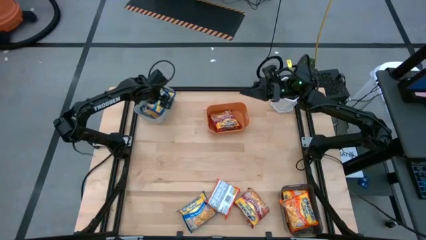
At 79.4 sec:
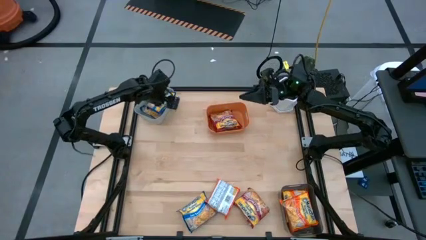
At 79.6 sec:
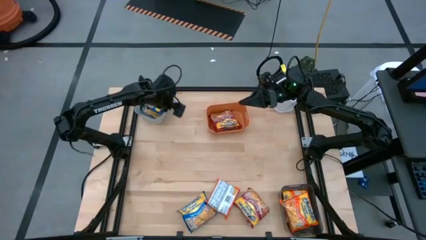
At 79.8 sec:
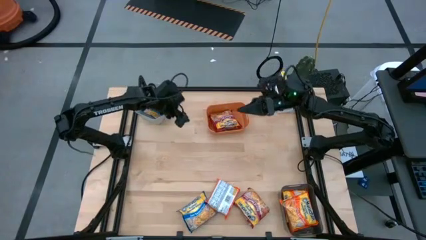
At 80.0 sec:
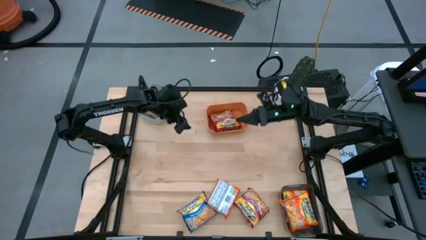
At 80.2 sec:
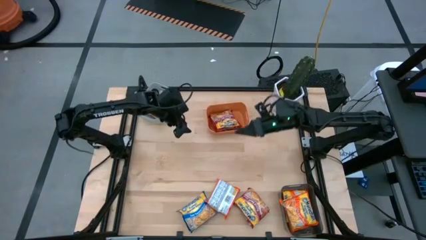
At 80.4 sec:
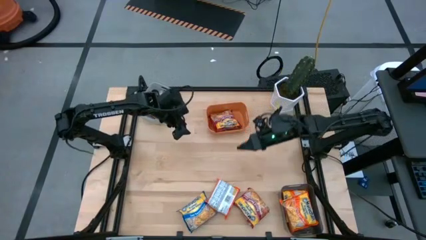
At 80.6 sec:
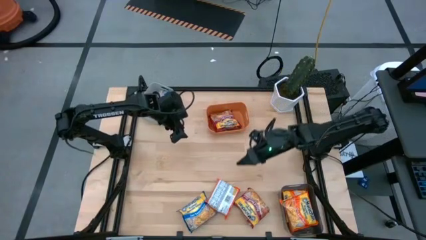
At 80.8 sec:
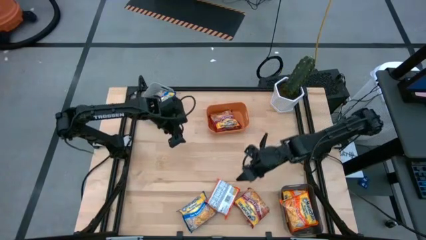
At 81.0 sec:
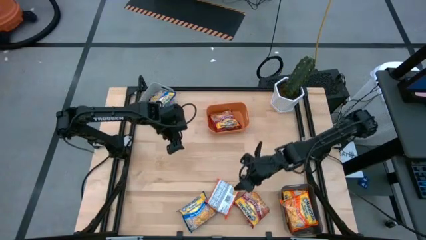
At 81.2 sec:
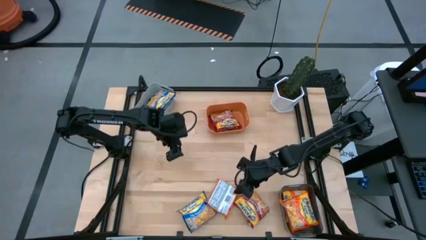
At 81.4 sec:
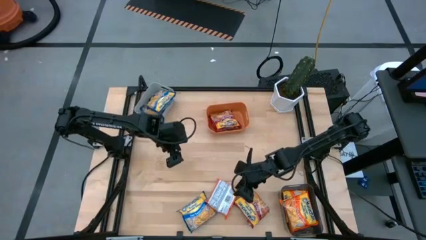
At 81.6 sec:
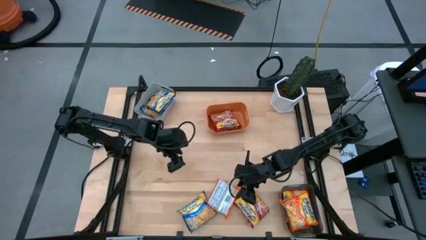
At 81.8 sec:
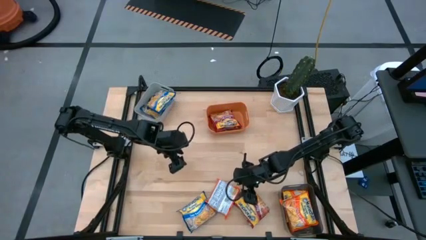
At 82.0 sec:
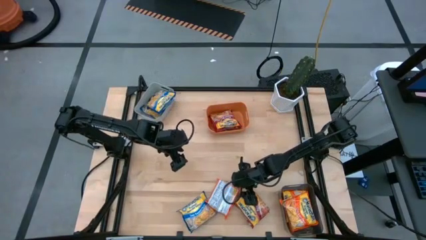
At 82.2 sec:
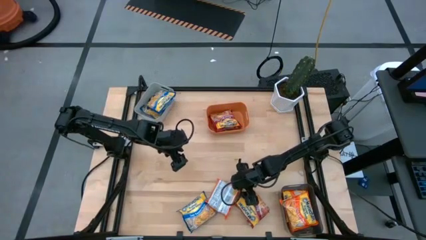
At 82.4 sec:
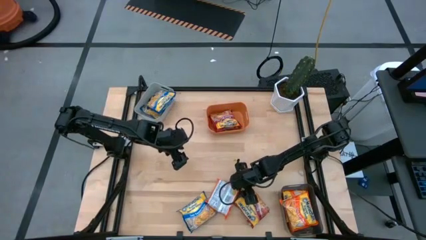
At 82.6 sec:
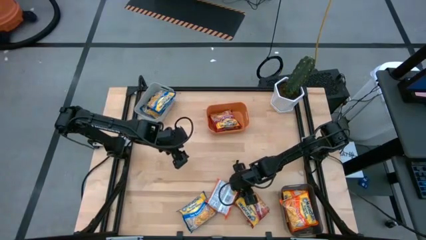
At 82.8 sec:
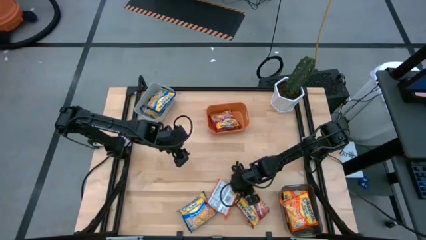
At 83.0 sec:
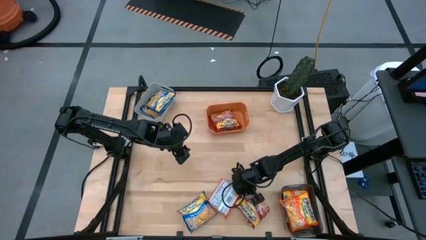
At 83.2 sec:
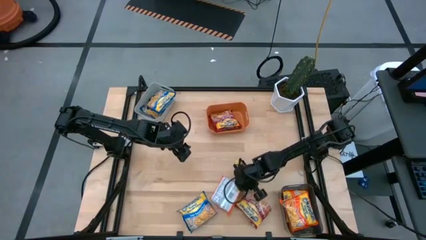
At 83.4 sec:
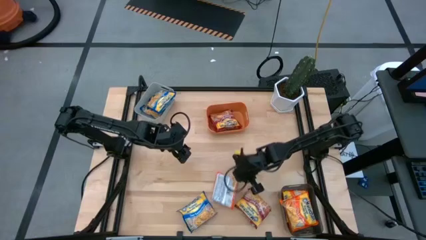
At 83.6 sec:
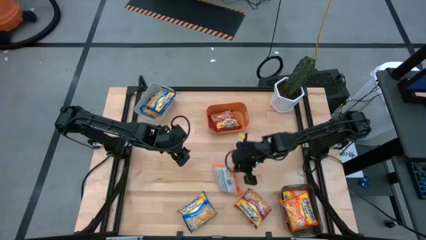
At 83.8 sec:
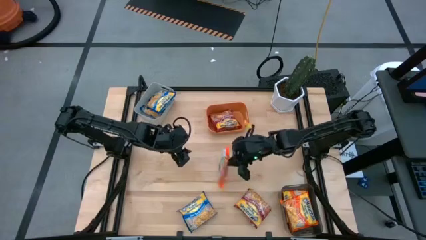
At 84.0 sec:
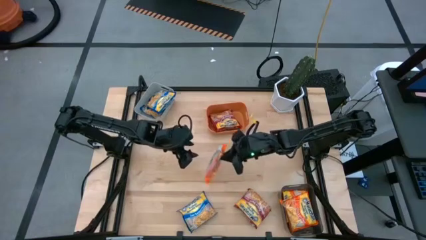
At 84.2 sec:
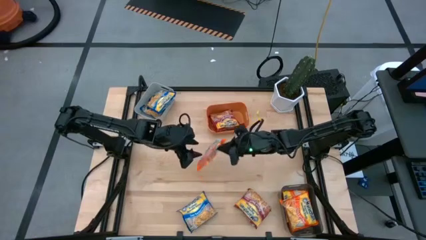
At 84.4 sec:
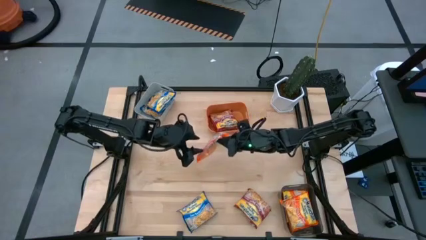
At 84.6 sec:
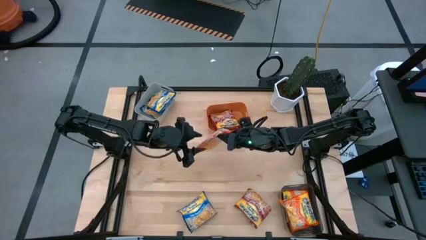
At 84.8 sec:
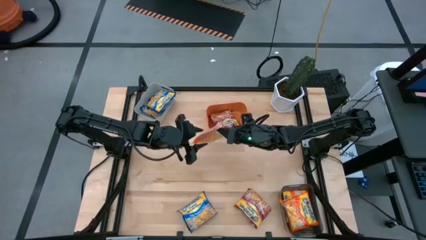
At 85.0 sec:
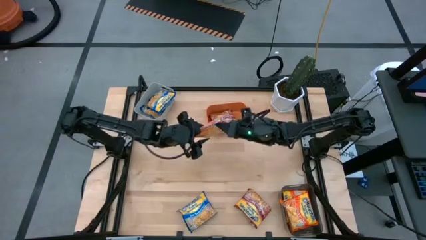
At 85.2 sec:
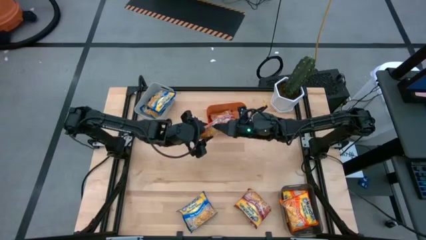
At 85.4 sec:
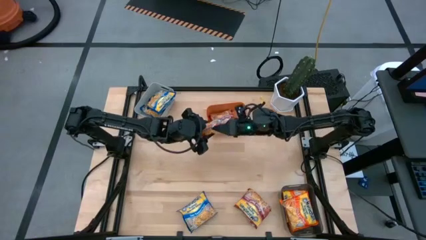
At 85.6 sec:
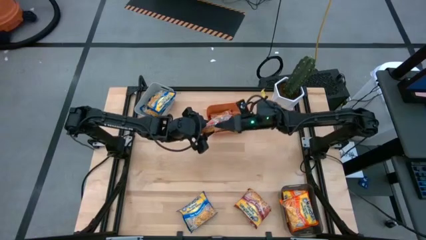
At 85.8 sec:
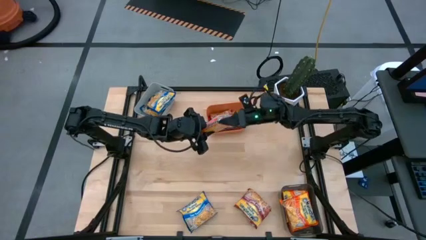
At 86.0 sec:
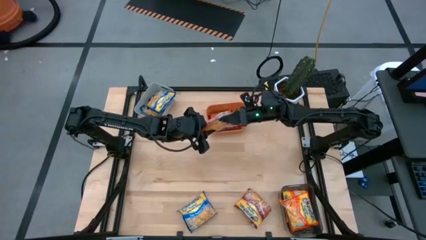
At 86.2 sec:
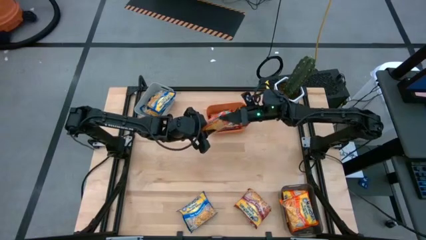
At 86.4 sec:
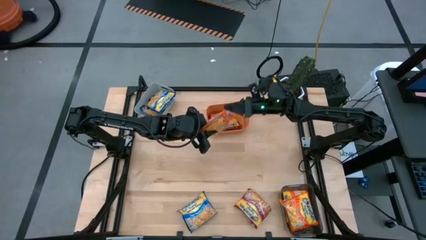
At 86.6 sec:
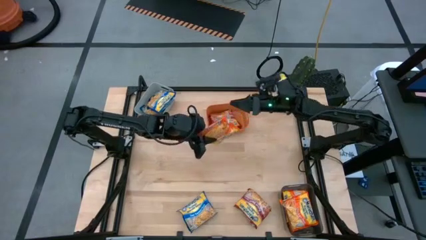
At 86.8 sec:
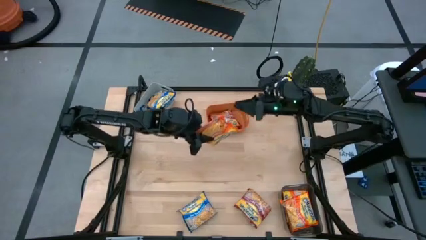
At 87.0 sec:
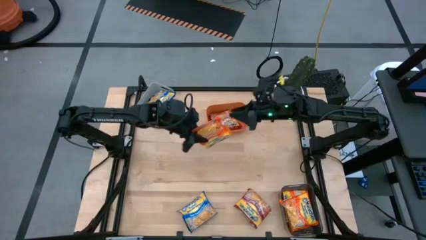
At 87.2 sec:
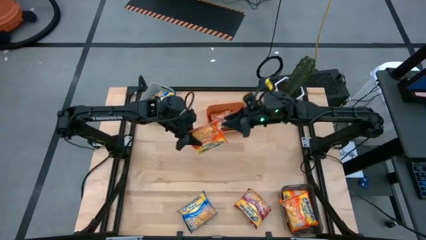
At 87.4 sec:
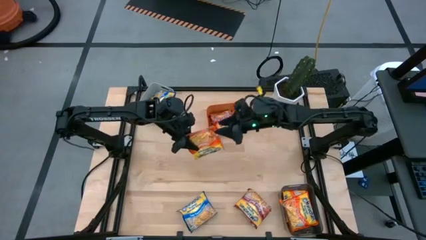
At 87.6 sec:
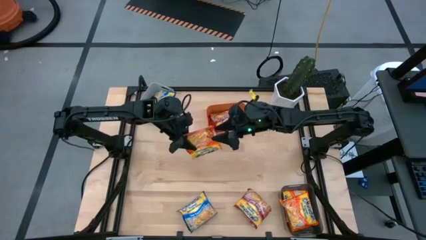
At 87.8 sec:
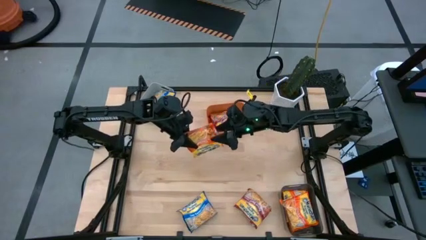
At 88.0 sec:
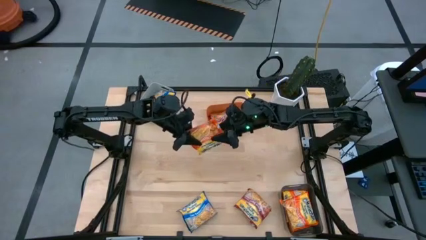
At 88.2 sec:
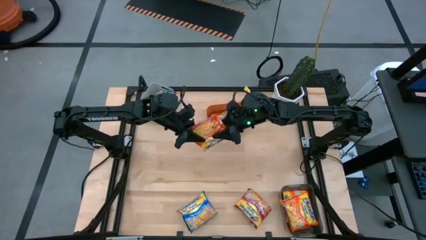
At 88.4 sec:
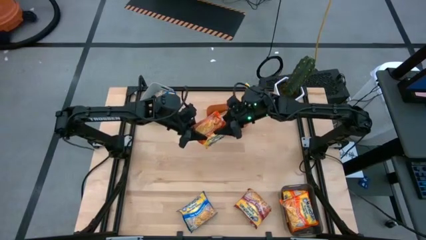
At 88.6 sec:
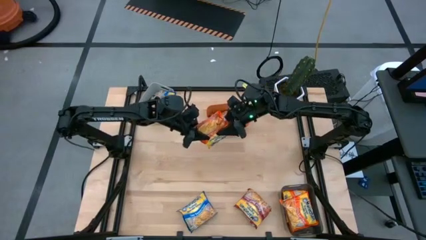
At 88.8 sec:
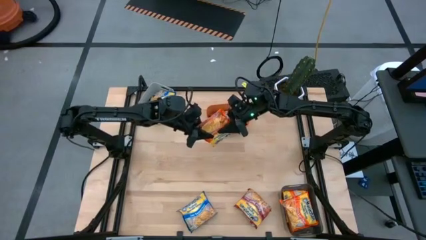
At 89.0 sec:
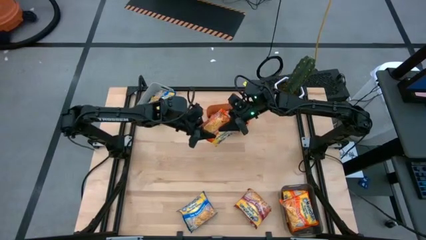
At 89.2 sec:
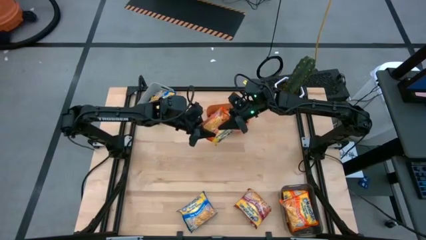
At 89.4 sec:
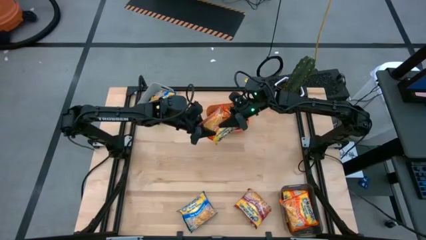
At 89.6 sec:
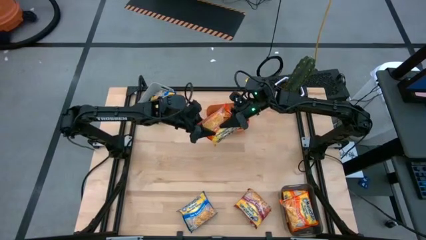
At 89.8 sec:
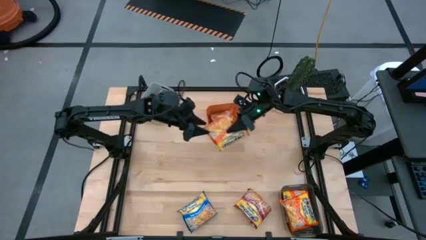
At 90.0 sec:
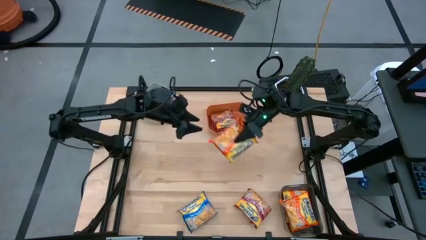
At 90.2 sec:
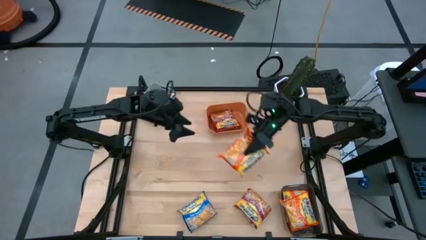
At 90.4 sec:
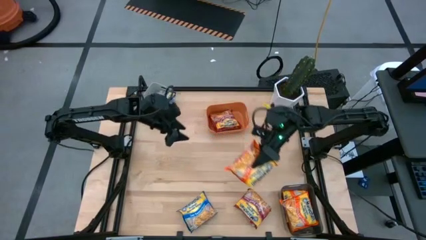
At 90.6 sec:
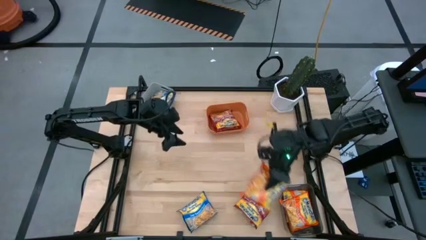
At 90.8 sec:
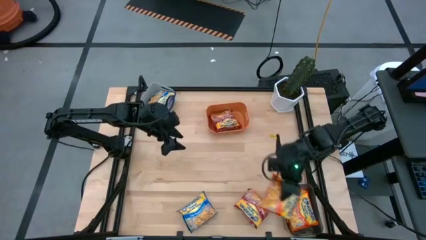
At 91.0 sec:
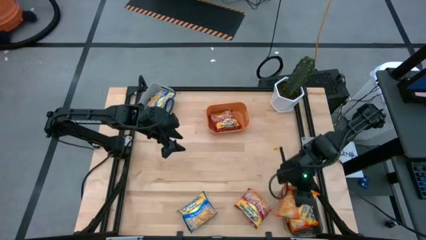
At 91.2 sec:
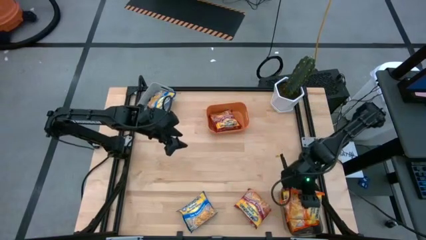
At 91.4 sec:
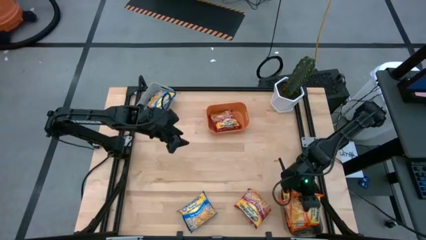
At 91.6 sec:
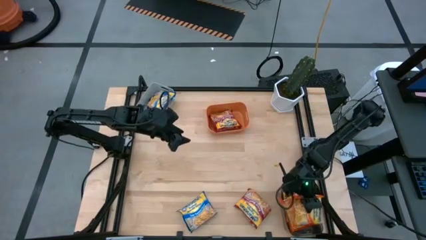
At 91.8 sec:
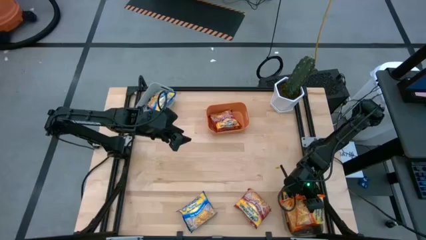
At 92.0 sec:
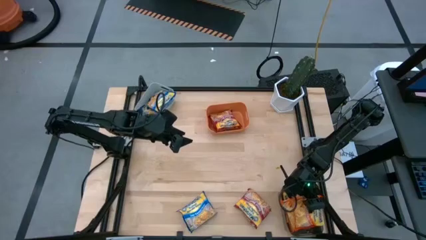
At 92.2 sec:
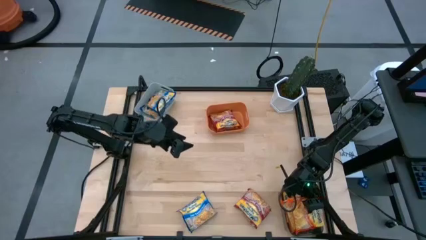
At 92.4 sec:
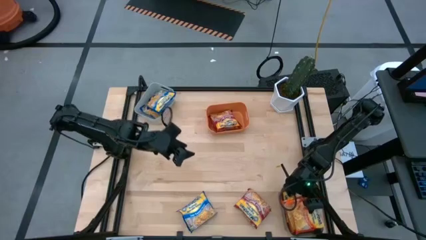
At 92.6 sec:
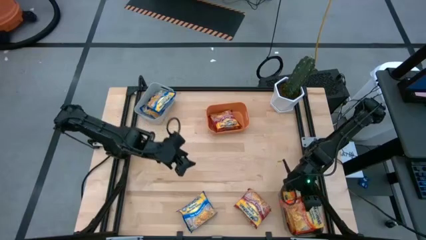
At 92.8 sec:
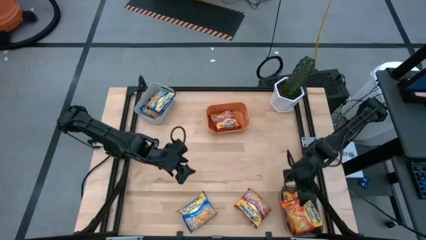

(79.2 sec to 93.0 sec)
Task: Sort Maruchan noodles
Put the orange noodle pack into the black bin

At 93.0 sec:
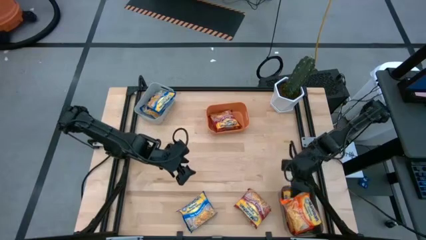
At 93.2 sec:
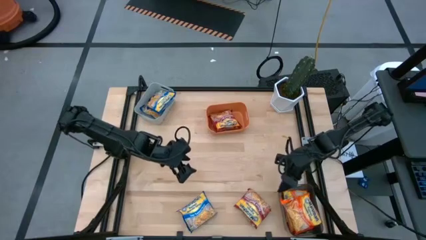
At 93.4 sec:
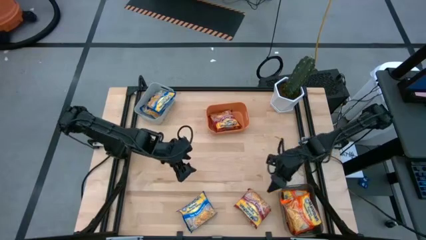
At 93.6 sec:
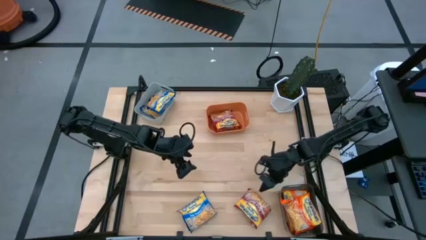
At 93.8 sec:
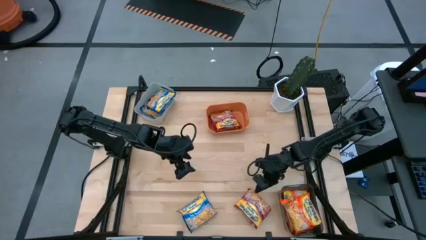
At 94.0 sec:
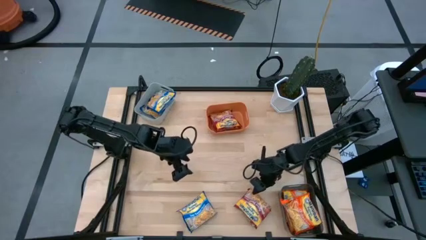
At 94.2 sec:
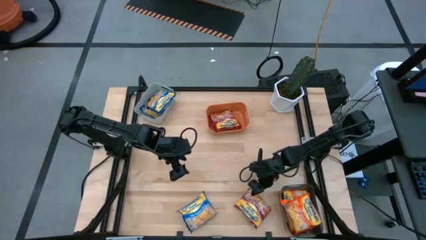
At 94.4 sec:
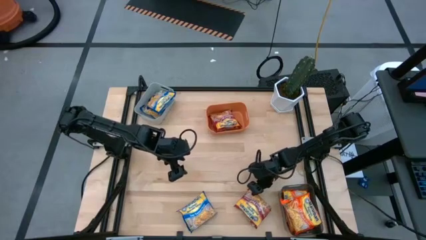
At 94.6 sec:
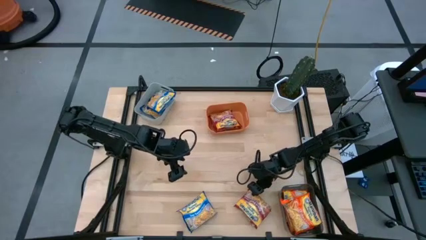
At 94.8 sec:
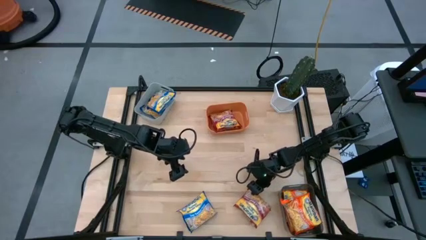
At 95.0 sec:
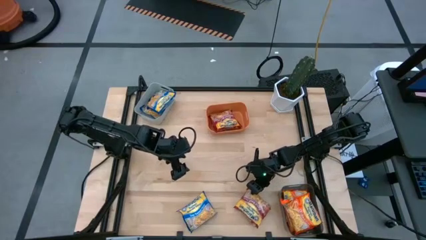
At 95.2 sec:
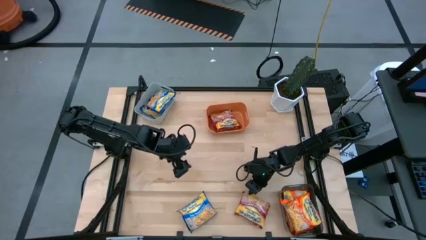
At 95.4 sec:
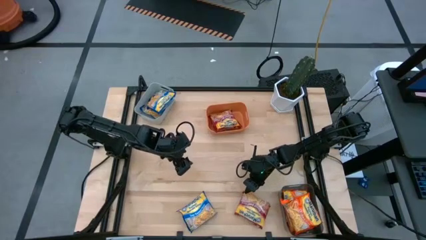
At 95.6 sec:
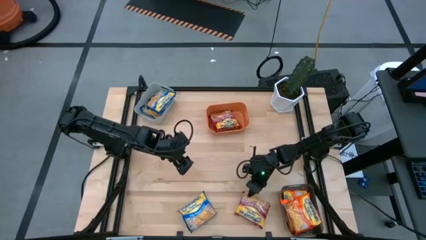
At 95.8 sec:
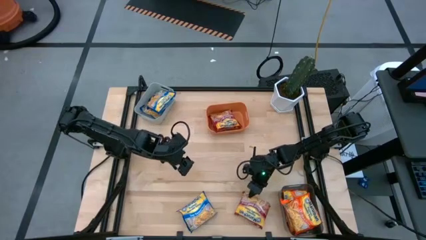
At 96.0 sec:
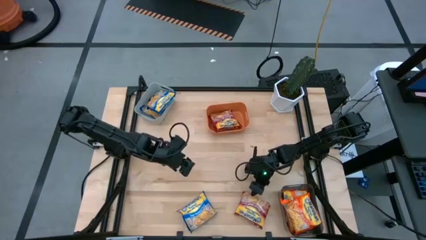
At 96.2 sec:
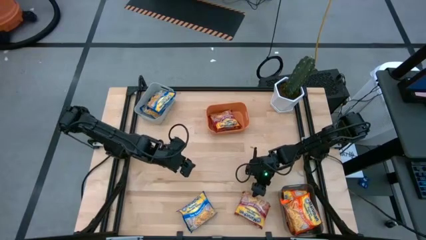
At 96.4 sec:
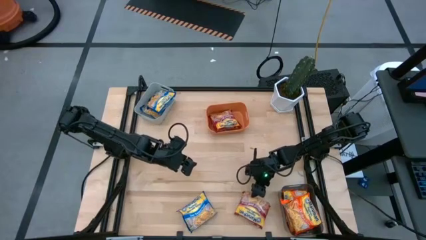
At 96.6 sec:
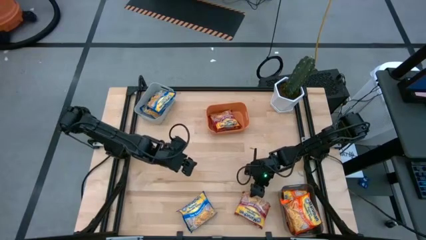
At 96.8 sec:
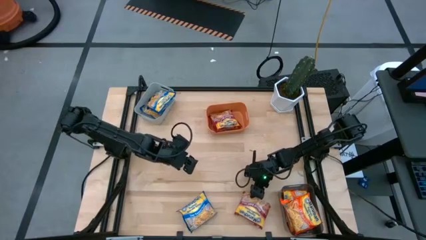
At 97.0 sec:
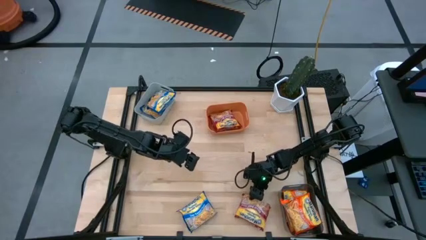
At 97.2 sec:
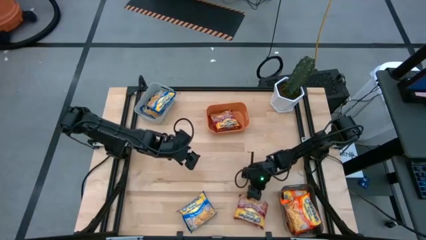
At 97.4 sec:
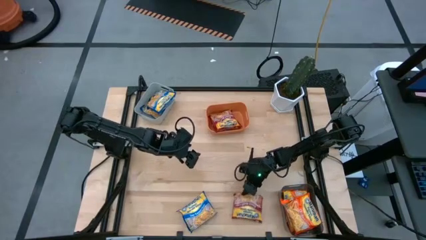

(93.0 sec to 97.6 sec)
Put the red noodle pack into the orange bin
